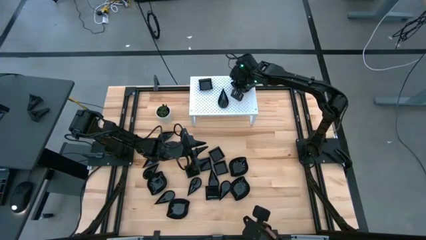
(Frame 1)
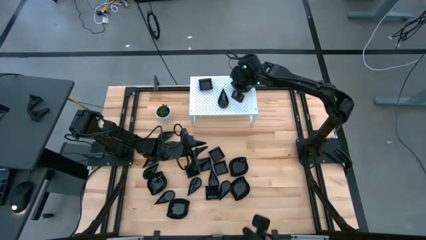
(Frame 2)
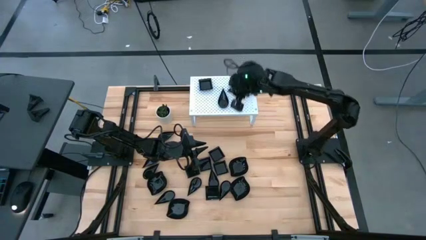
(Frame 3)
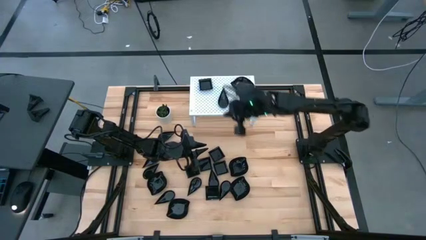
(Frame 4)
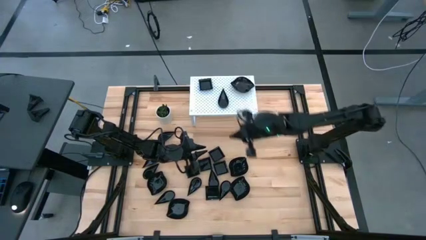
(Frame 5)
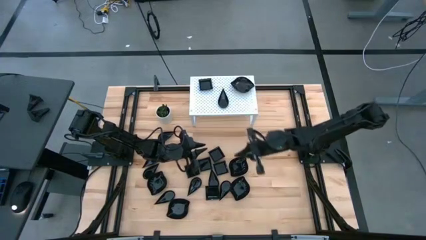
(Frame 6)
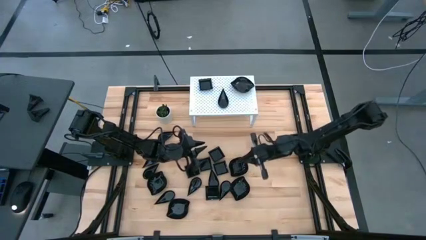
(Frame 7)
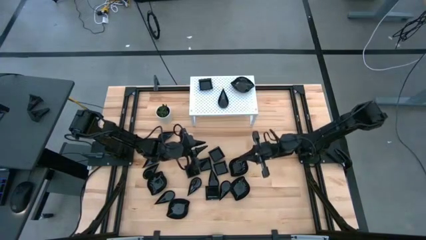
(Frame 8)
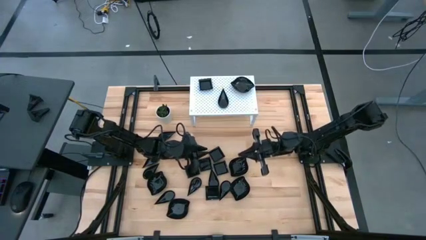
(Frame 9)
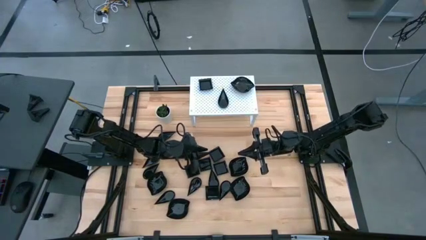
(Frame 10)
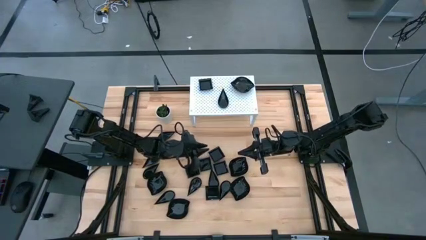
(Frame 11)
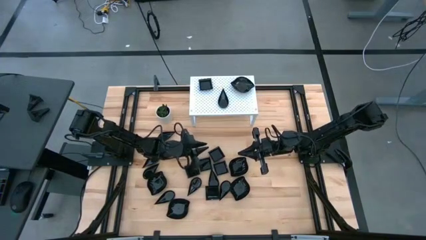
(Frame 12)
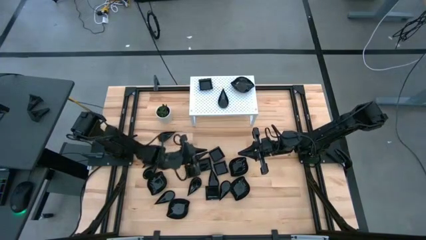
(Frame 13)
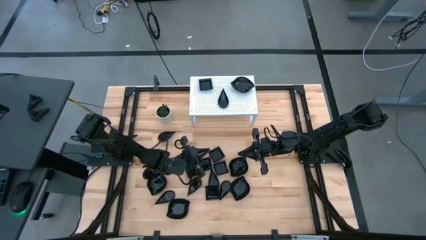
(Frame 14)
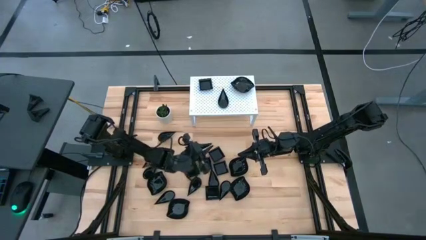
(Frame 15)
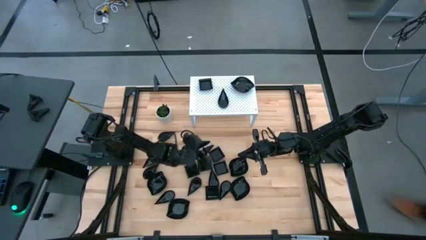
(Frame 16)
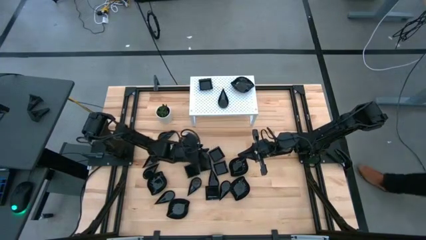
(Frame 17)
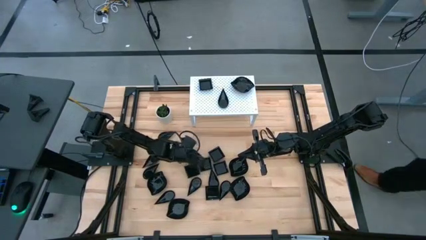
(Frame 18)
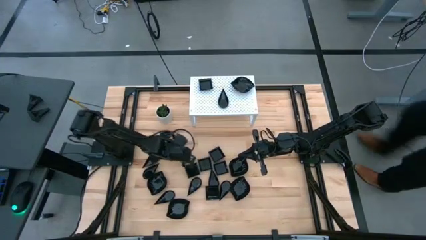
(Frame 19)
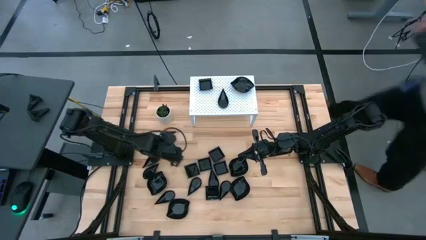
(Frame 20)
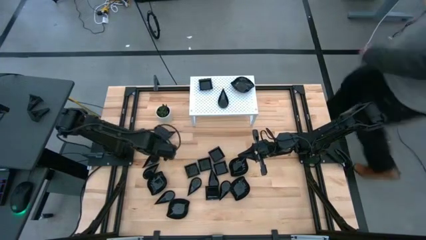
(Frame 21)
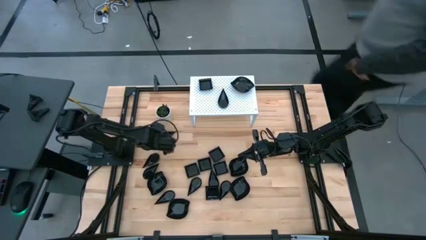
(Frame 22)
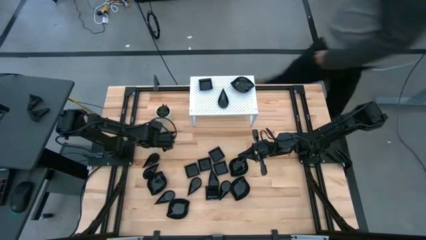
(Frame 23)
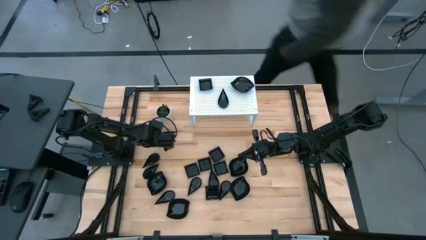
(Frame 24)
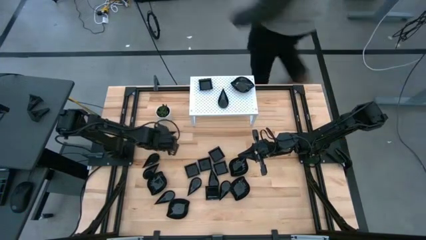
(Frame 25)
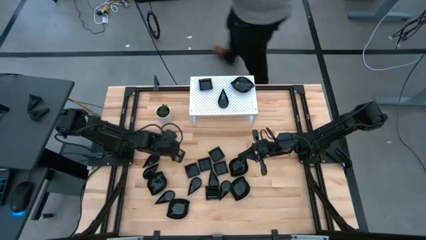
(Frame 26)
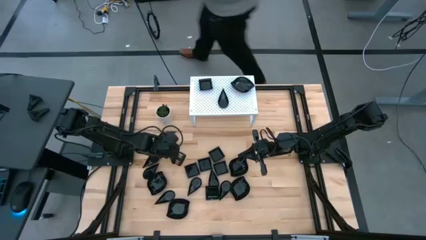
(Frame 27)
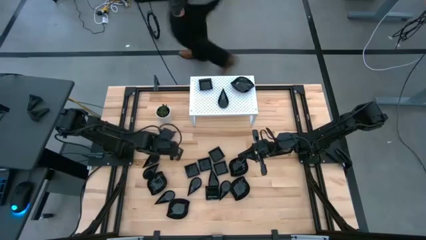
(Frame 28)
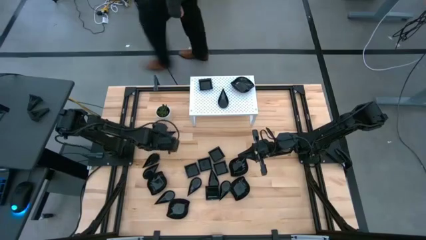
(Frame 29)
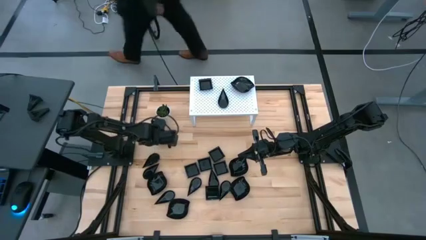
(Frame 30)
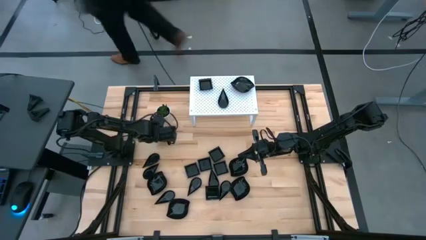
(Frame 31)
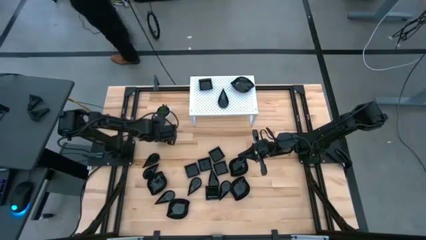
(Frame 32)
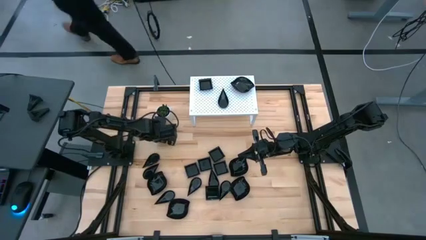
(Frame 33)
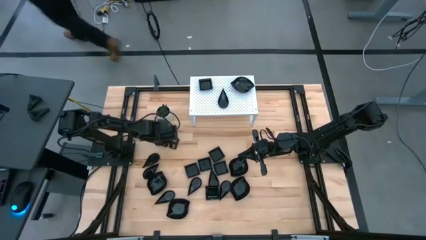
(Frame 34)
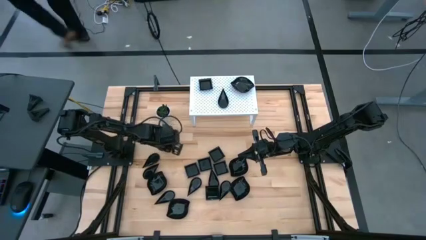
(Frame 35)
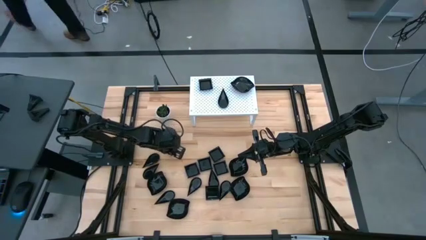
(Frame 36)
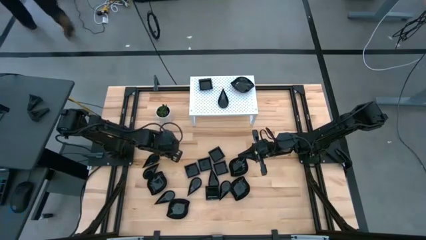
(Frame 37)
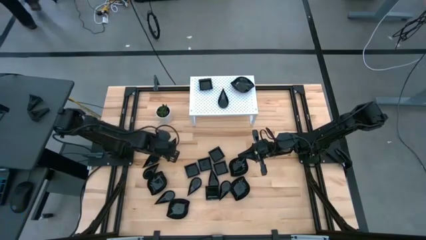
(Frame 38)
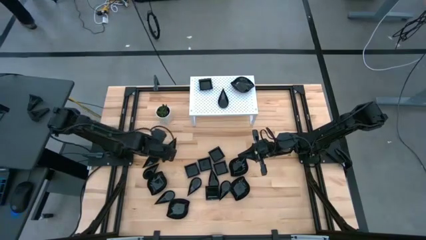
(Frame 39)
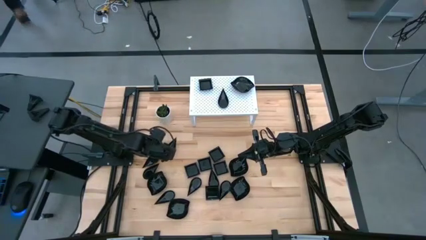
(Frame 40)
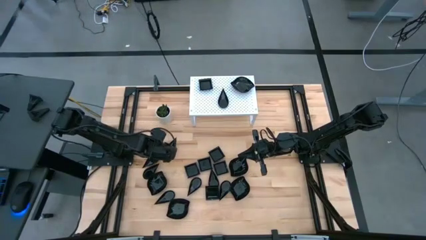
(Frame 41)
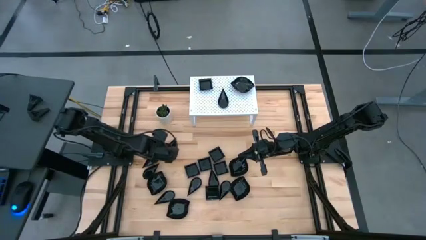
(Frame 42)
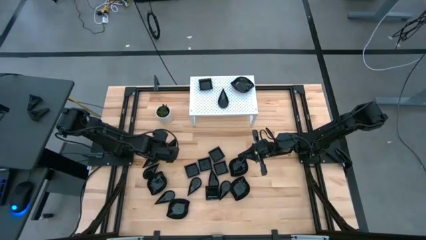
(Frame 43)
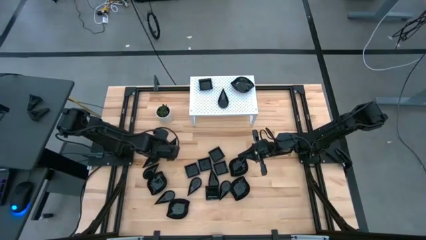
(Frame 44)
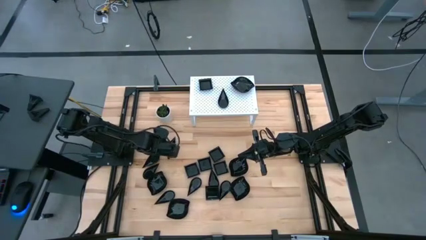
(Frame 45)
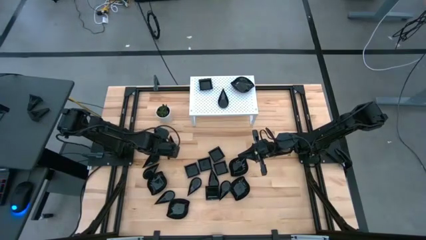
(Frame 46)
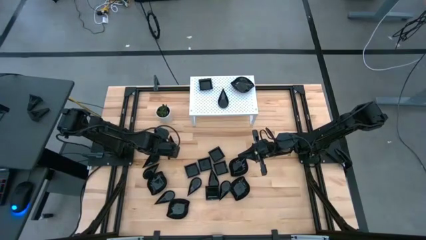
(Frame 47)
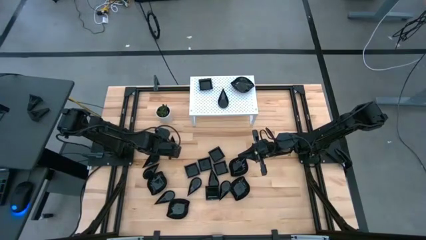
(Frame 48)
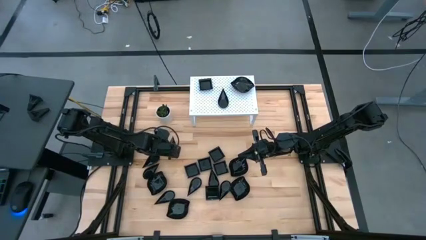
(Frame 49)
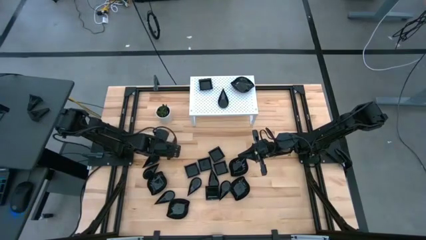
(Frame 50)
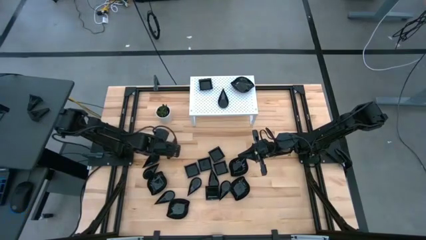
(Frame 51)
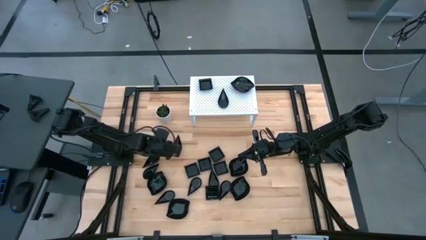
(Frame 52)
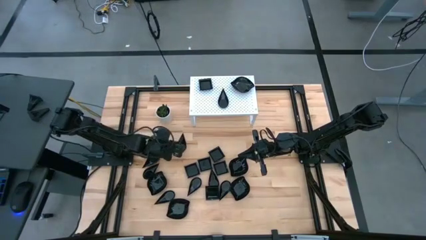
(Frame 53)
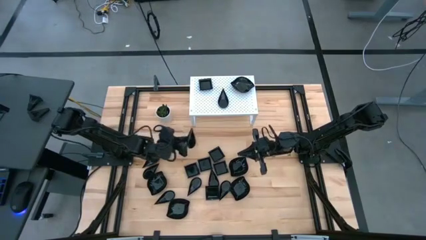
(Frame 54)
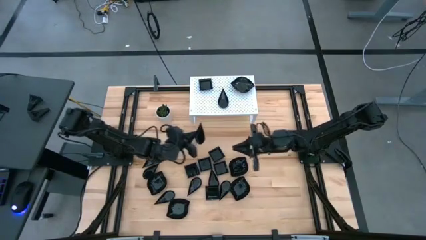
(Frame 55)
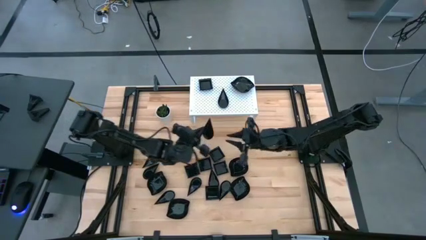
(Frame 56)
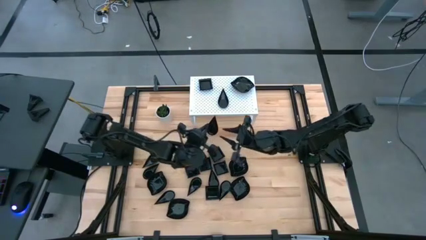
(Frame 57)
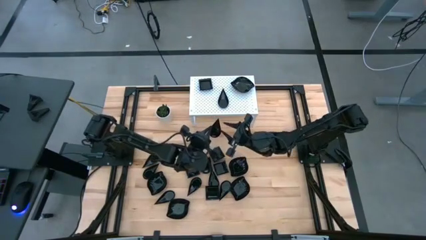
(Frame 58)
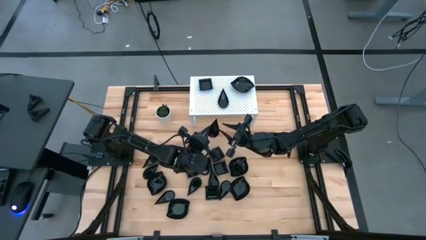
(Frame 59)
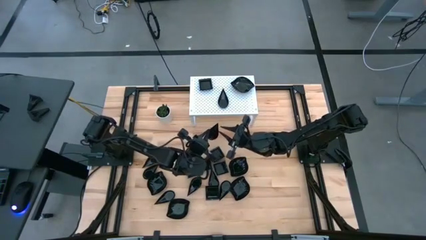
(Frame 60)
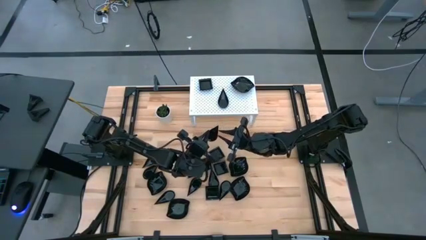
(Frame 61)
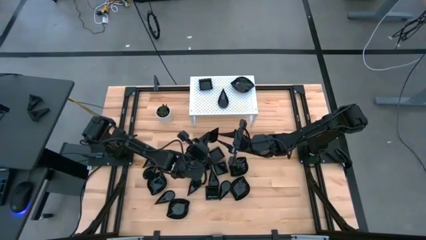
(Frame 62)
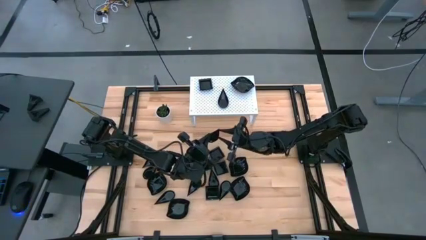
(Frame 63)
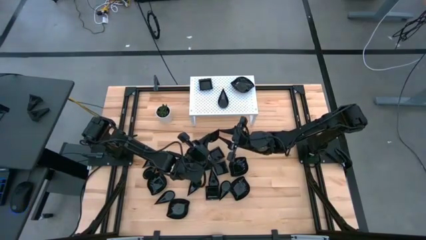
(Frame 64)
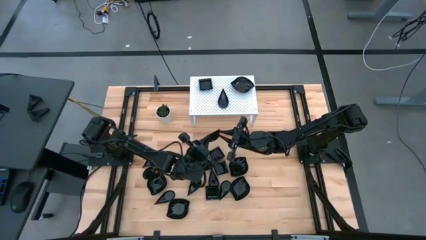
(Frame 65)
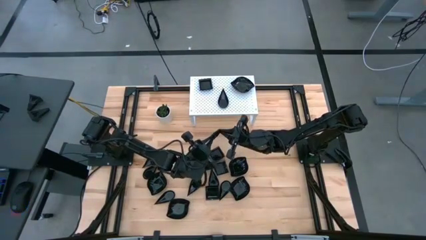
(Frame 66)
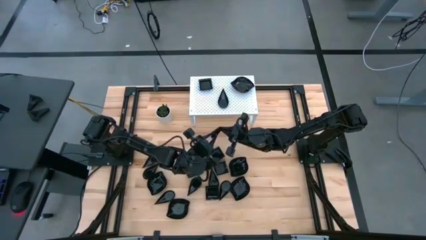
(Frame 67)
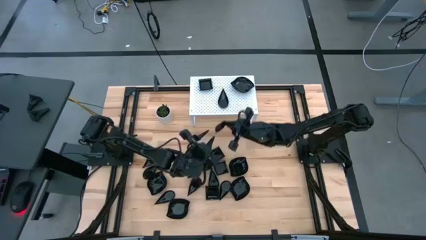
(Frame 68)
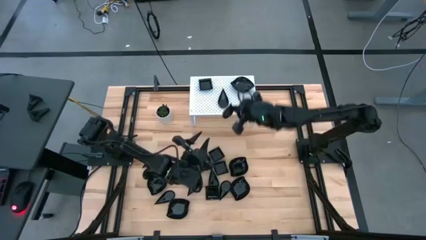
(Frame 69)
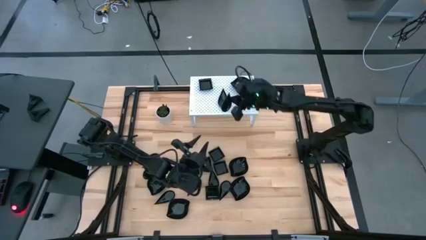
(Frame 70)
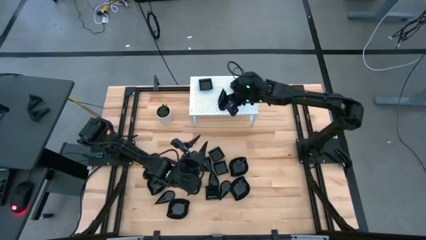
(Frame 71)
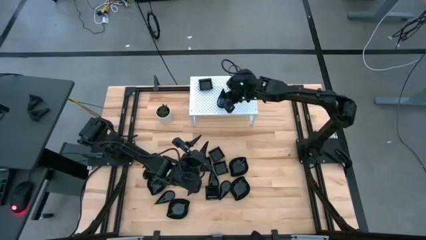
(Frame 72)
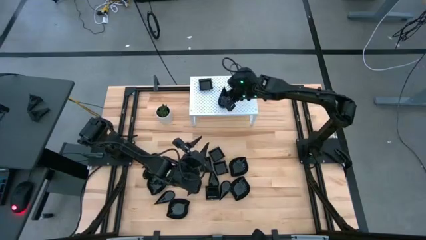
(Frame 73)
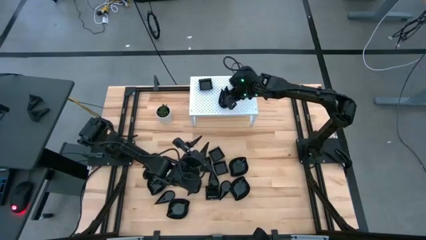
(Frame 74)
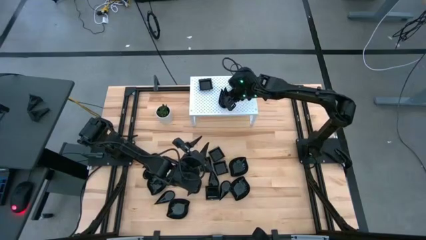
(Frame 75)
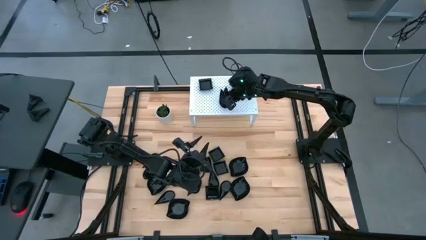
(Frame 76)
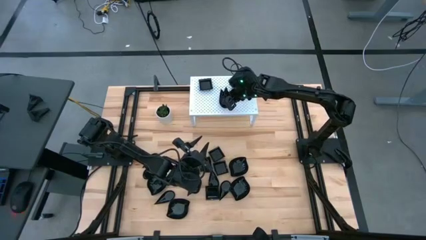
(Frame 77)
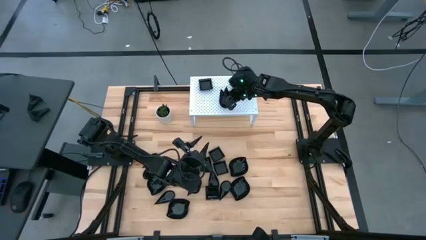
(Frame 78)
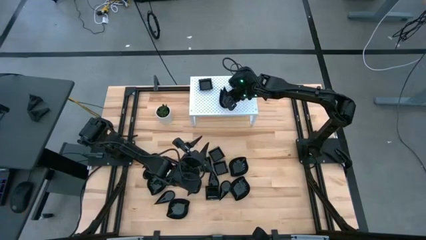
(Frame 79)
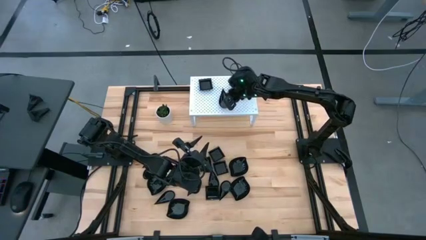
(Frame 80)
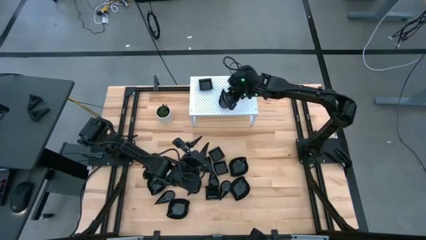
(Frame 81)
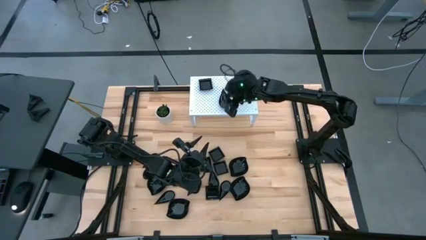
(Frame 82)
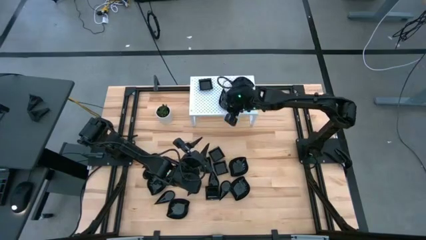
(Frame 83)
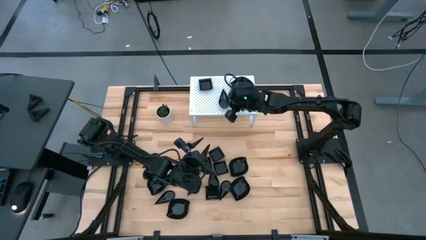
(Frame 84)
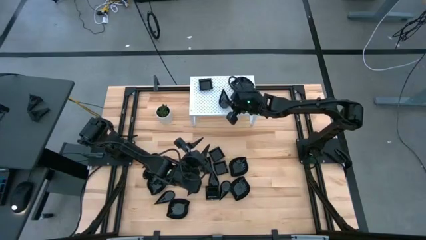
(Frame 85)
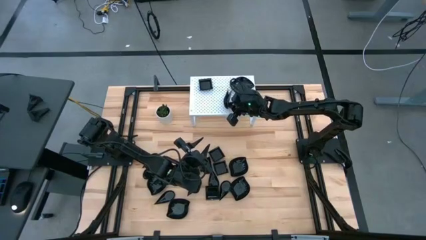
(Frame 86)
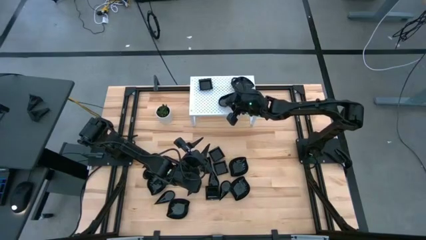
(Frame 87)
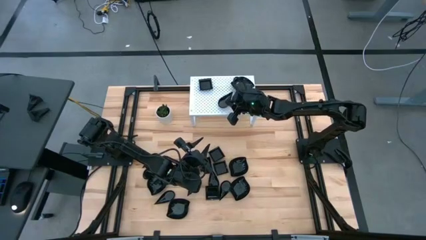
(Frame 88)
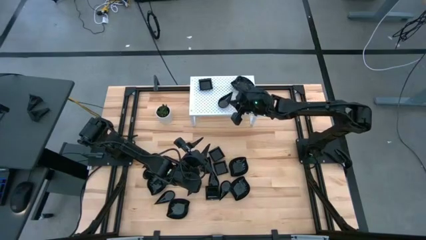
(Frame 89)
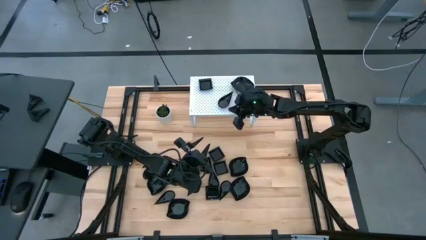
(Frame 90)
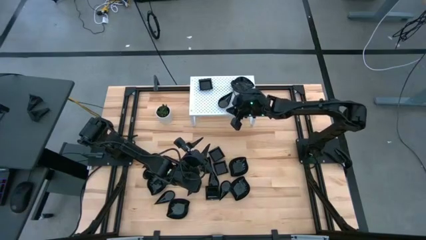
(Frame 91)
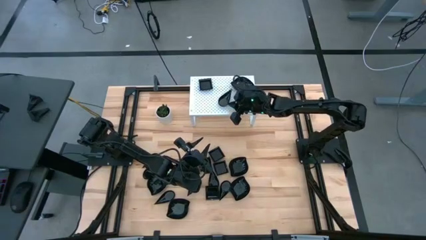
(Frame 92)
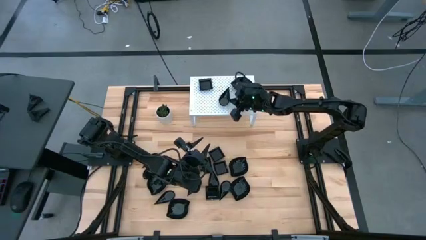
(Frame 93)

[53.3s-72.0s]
Task: Pick & Place Mini shaped plates
Stack the black plate on top of the black plate on the shelf
